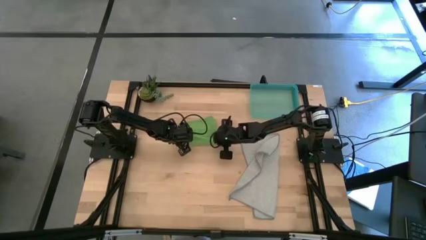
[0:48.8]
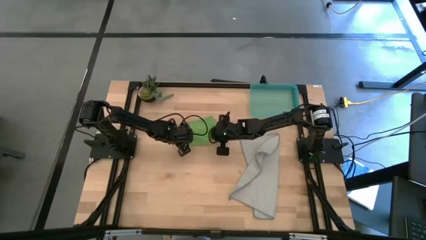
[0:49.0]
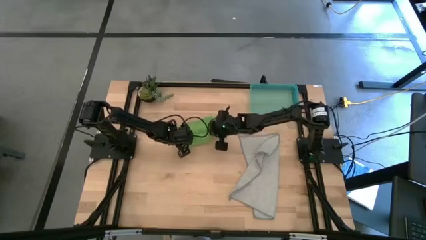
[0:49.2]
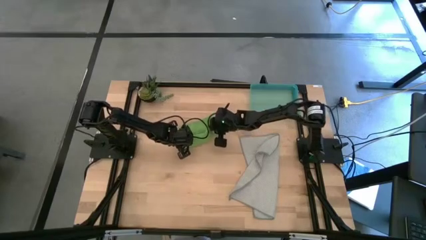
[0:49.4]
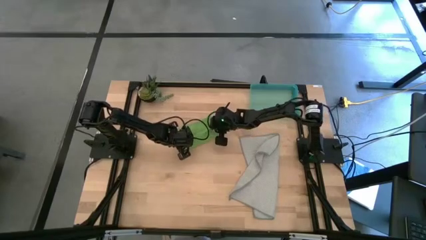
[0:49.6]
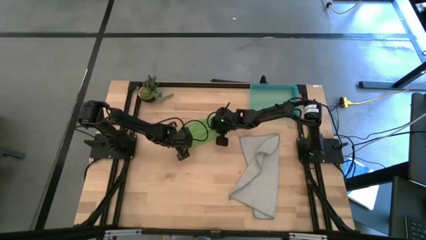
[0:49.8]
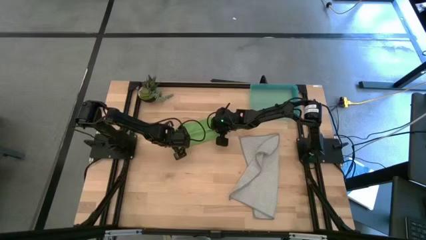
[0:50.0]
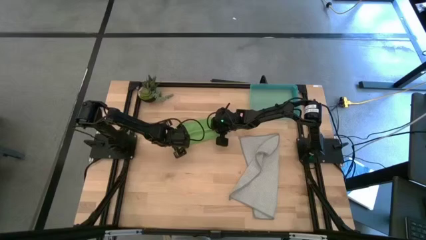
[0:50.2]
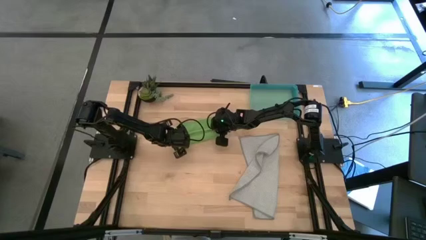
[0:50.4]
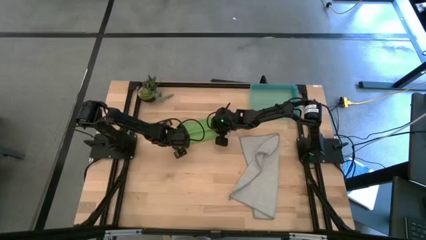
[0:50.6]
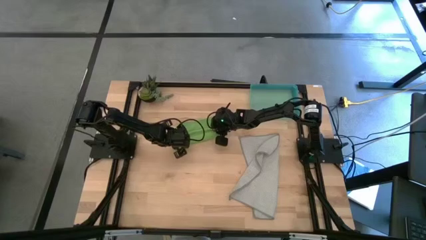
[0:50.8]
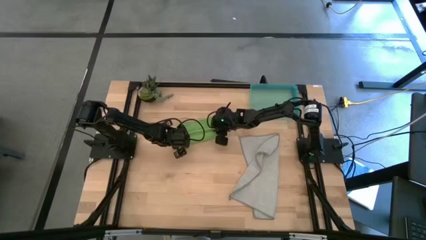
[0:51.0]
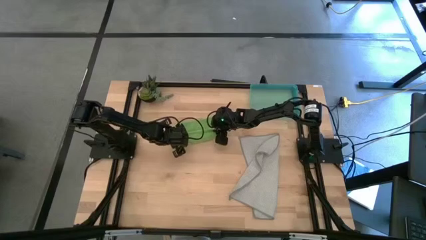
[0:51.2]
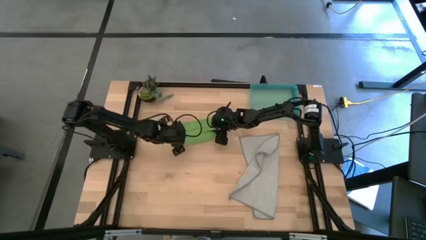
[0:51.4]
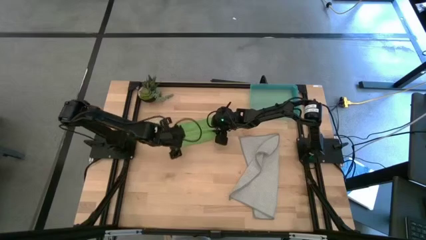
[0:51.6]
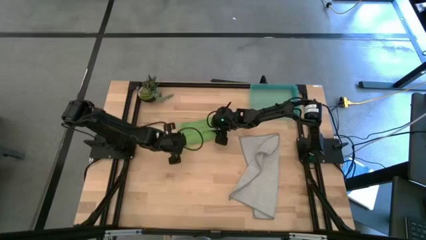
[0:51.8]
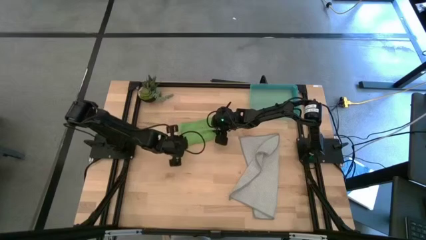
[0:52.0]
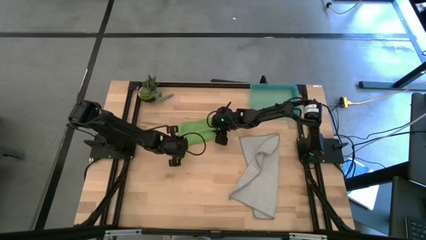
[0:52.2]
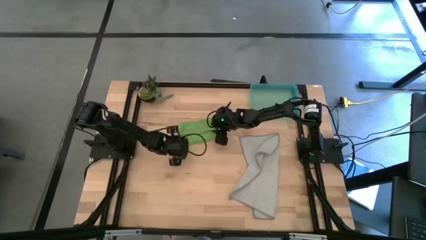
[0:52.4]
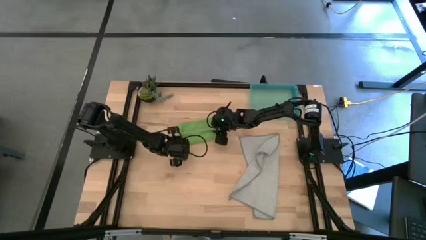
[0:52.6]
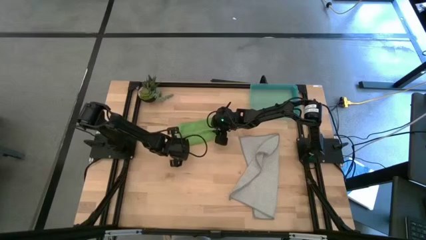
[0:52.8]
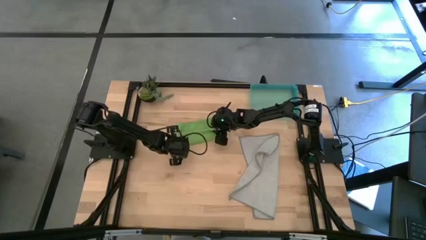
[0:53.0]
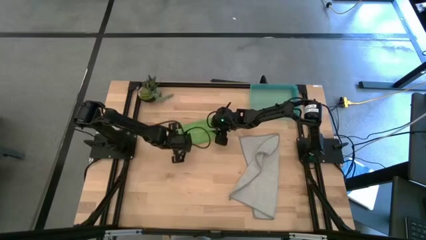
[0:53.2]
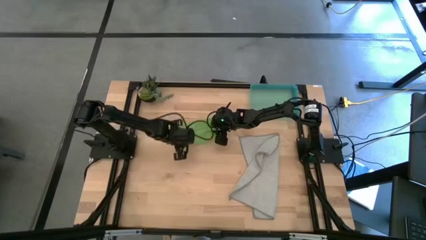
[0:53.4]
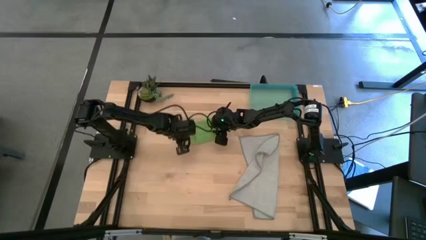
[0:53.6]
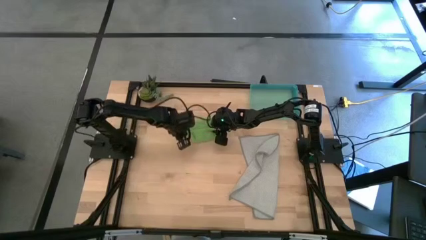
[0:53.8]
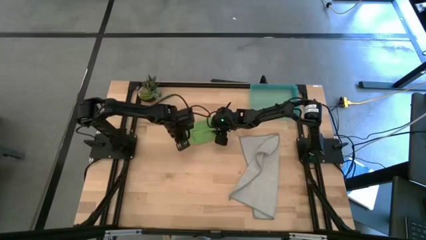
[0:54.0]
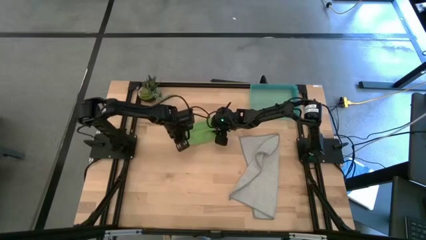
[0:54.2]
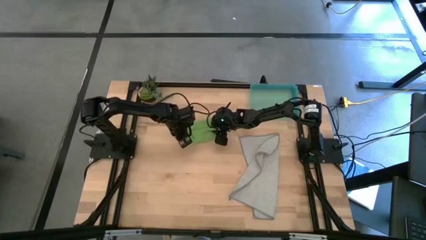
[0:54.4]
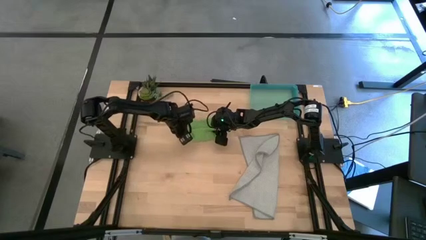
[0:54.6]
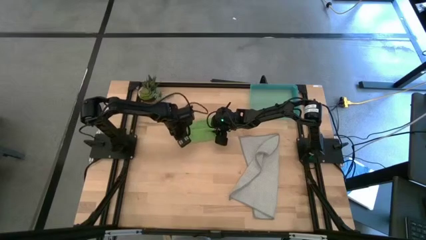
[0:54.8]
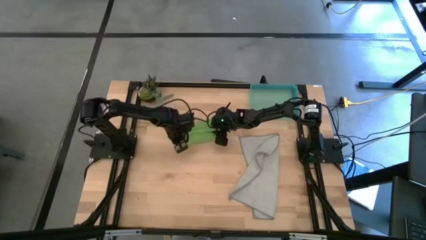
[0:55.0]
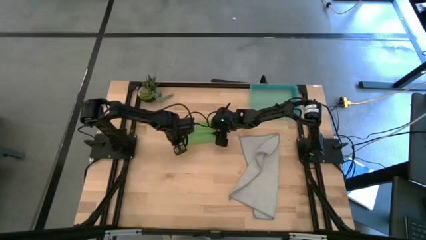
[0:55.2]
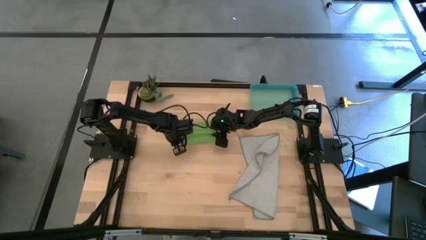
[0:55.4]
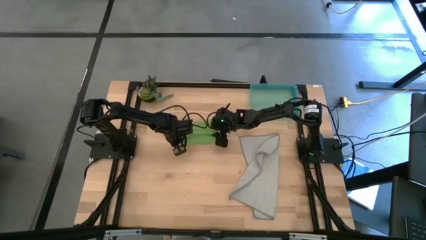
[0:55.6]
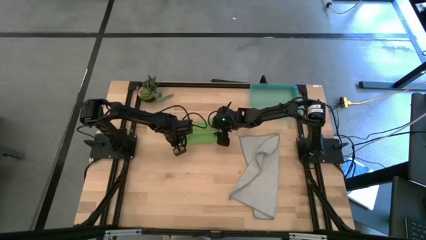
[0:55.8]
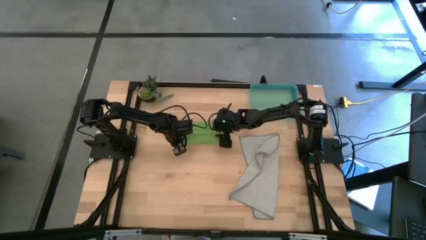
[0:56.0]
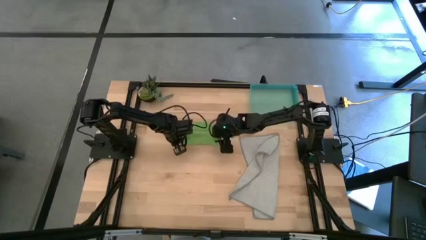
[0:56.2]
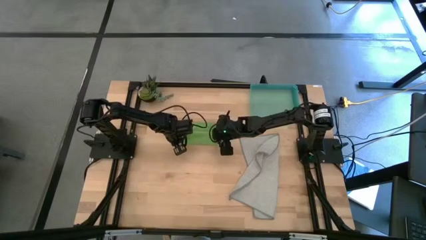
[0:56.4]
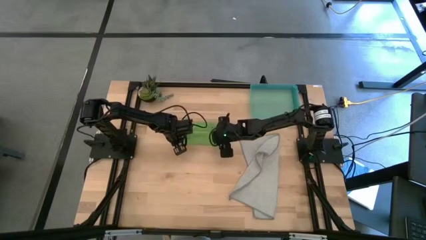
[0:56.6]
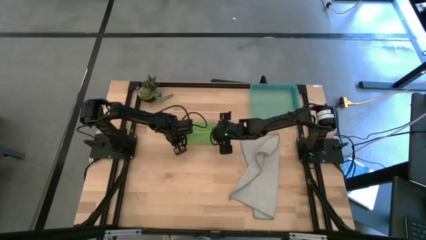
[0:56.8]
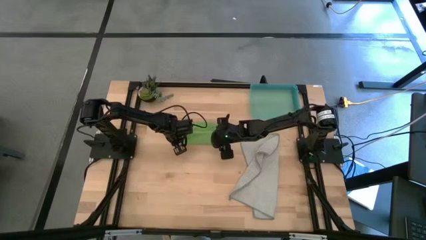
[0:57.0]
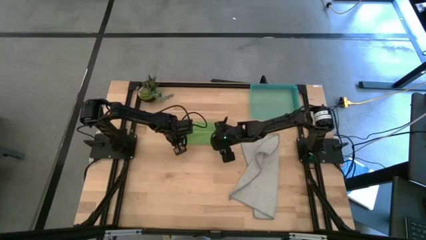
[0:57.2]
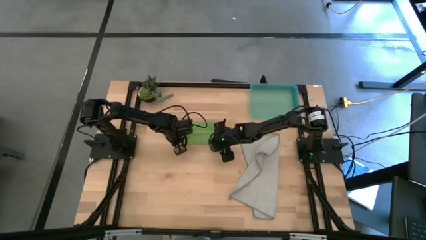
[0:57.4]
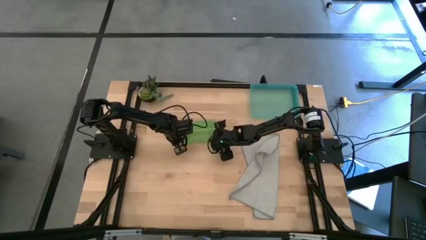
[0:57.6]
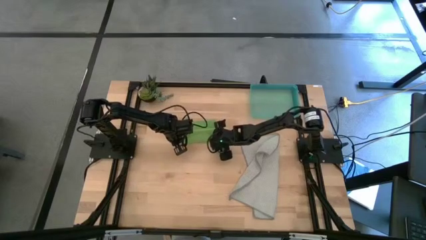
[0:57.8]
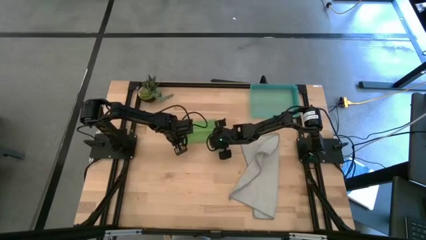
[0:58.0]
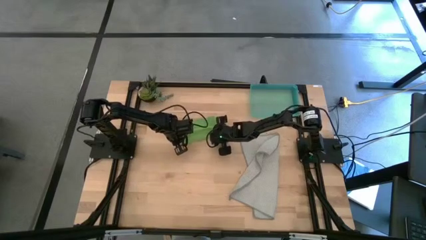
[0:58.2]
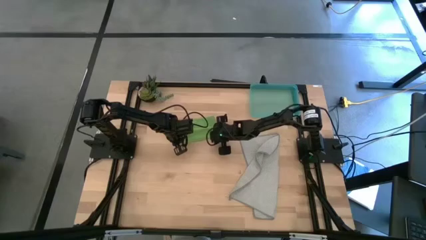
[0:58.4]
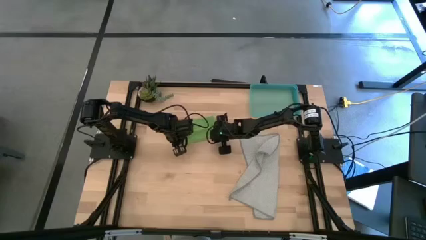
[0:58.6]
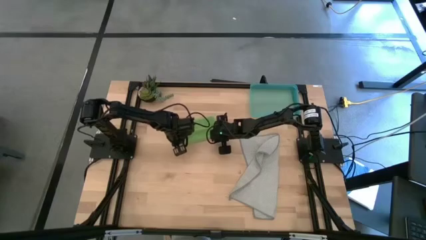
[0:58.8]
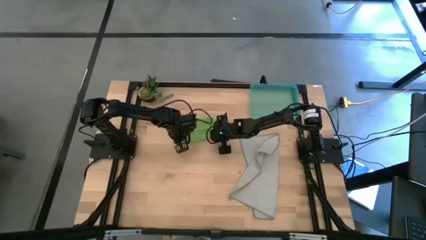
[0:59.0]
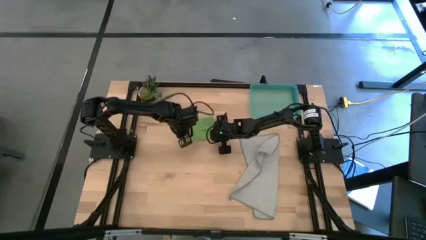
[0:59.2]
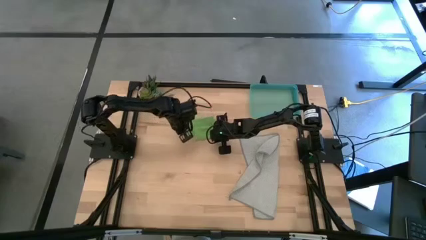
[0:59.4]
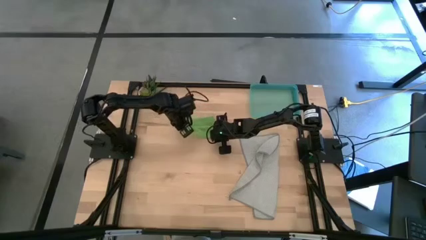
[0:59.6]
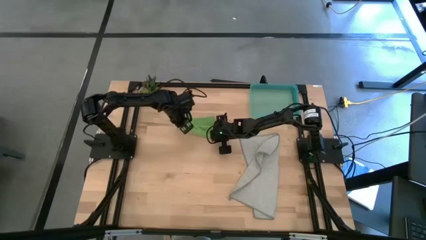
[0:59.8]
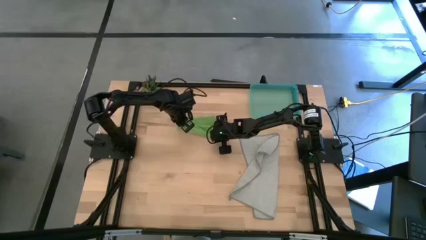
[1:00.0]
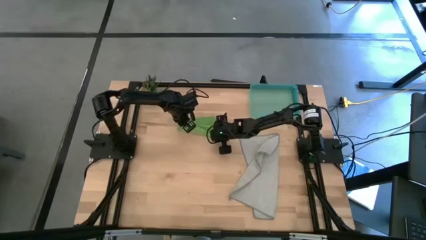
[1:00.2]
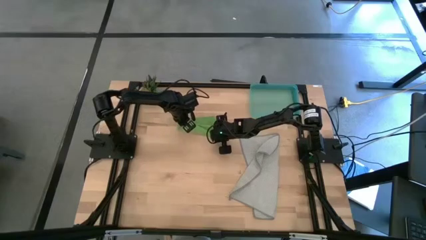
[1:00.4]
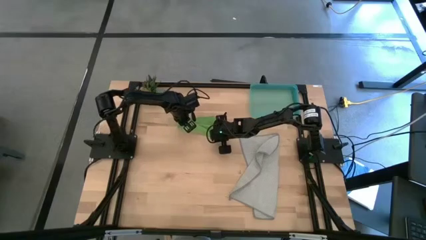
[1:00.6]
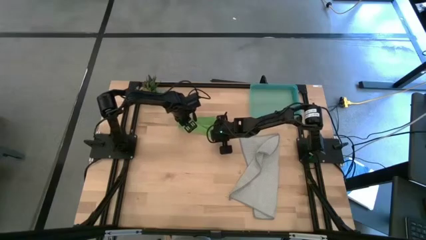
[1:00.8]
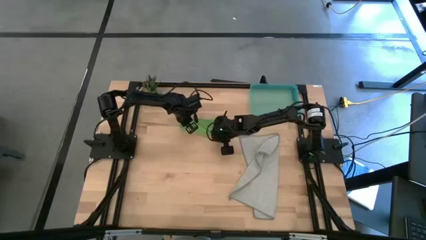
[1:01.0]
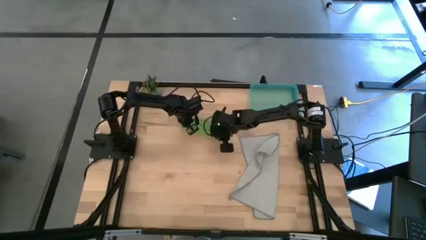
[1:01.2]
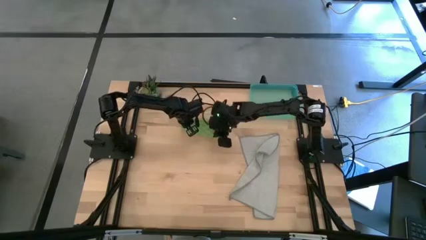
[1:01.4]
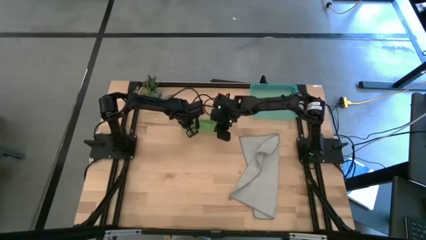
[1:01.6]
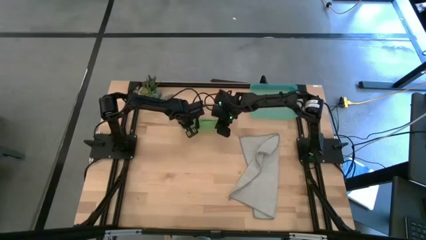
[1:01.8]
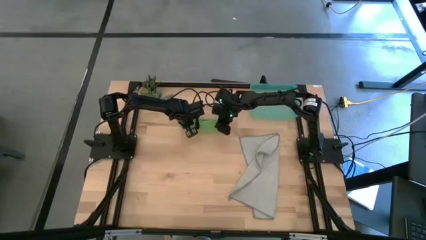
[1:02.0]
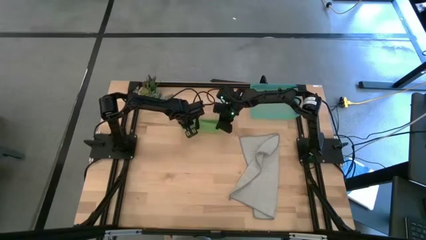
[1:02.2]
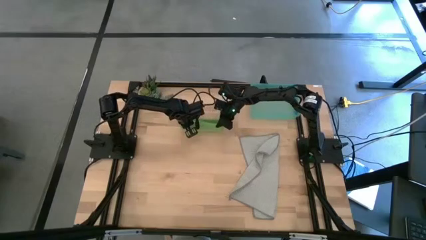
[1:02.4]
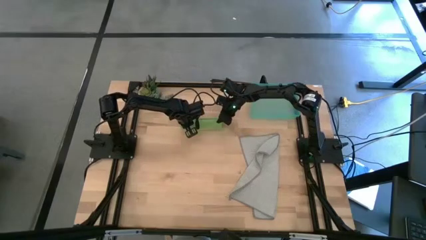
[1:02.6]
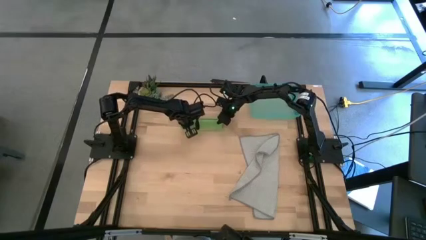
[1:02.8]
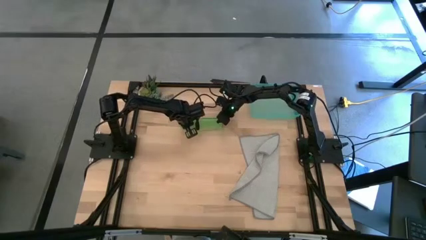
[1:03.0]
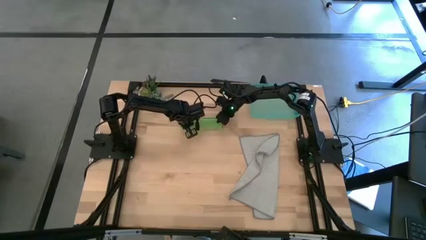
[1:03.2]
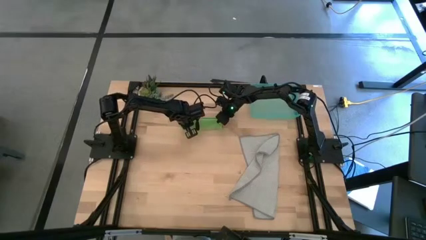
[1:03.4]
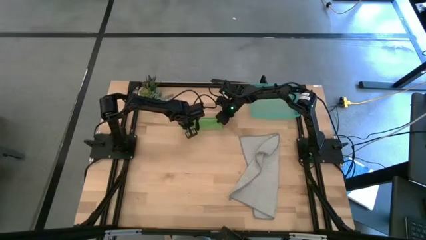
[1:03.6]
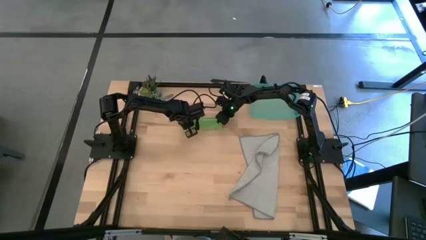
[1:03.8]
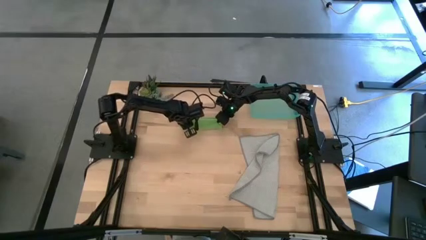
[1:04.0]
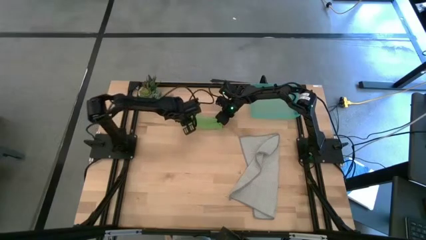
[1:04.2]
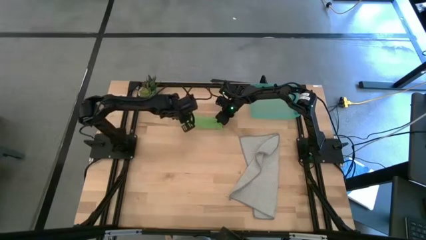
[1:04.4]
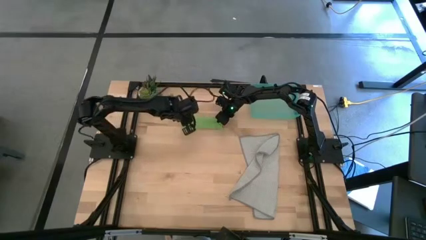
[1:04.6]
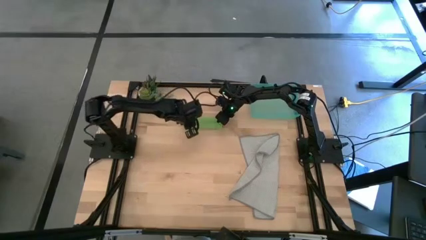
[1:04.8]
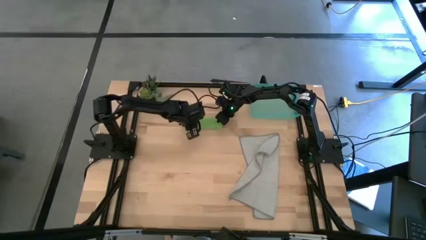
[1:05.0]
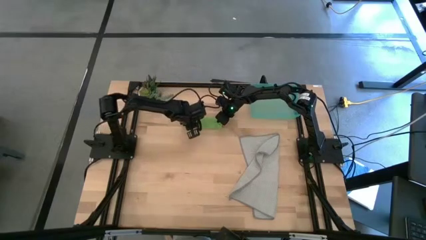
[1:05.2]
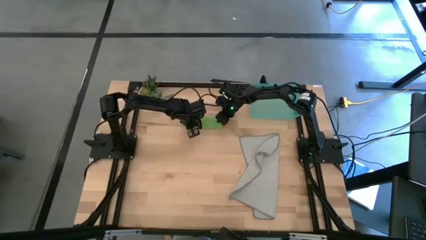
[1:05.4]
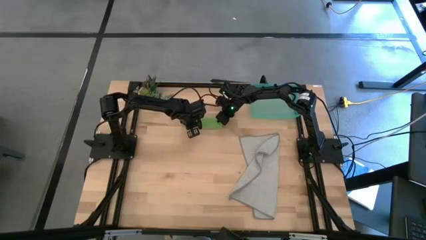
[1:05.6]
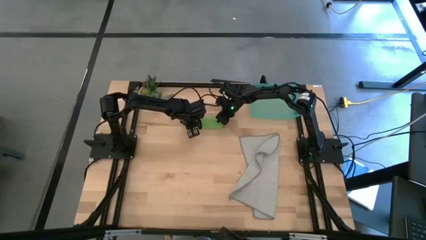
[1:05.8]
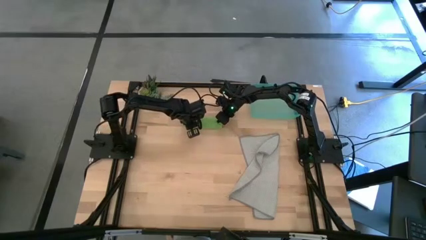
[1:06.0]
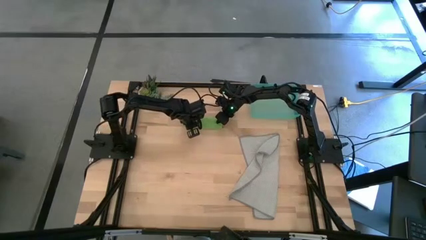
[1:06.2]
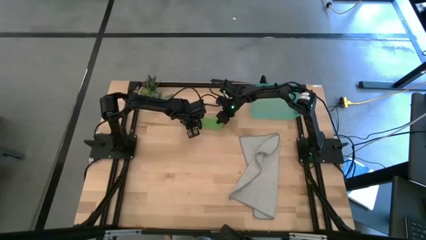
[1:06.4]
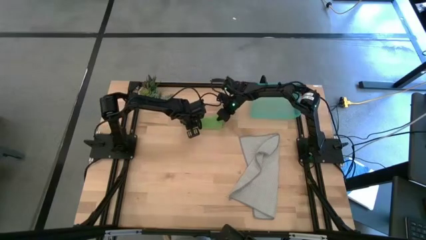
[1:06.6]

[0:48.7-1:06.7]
Task: Roll microfiber towels into tight, uniform cylinder then place into a basket
Roll the green microfiber cloth
